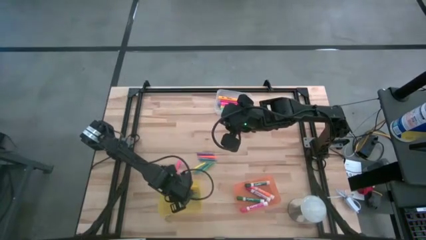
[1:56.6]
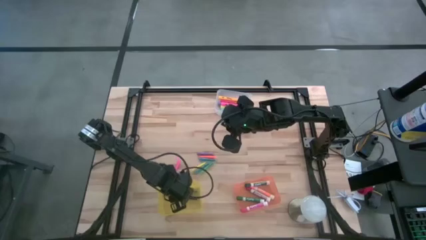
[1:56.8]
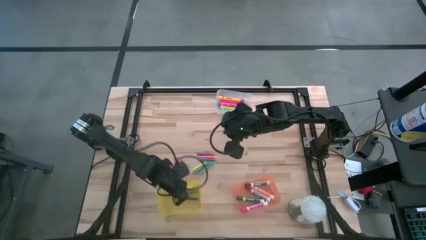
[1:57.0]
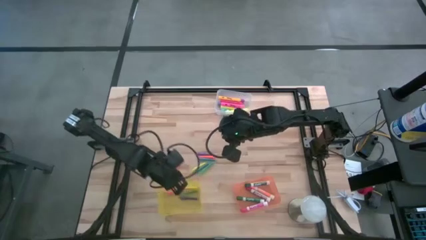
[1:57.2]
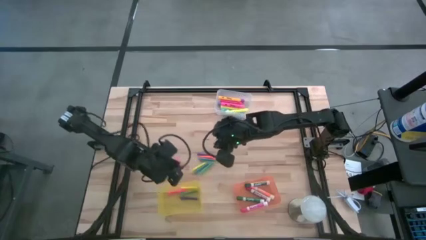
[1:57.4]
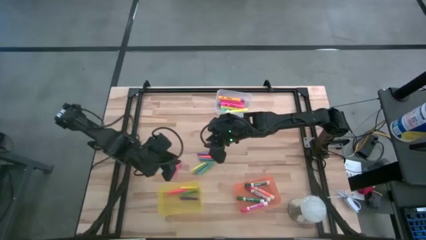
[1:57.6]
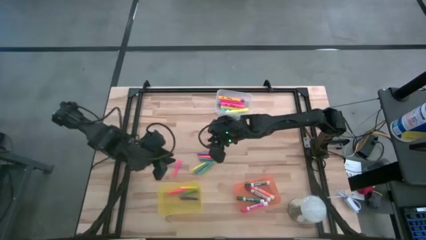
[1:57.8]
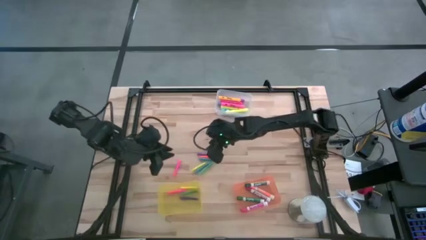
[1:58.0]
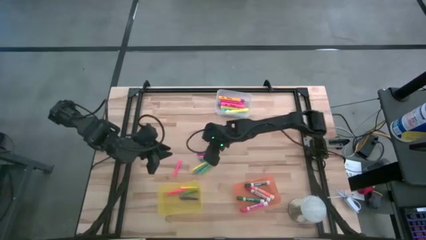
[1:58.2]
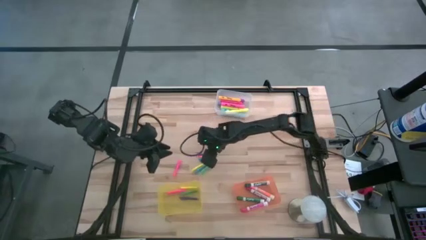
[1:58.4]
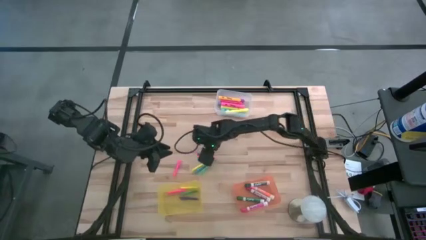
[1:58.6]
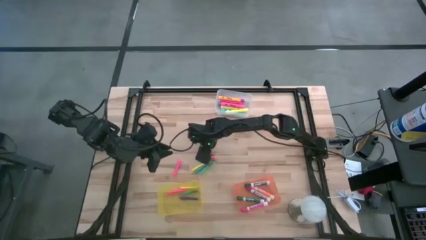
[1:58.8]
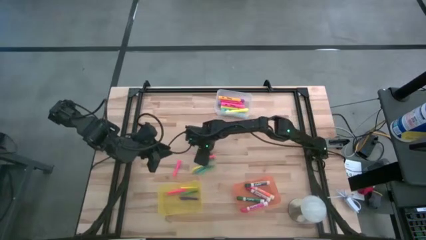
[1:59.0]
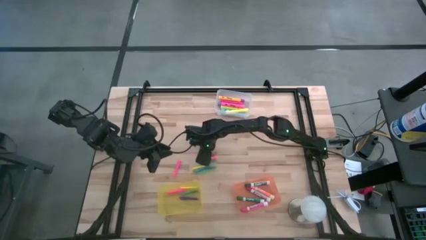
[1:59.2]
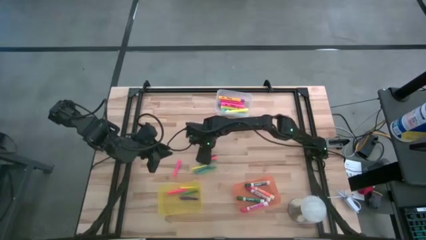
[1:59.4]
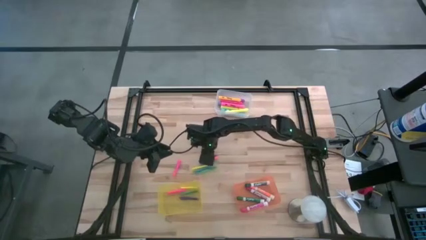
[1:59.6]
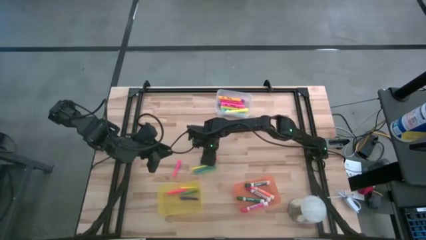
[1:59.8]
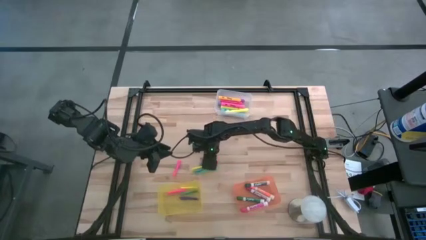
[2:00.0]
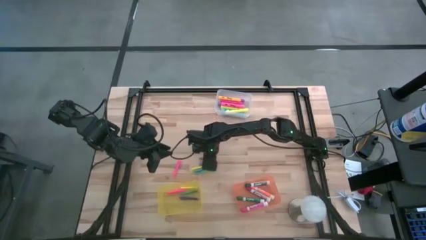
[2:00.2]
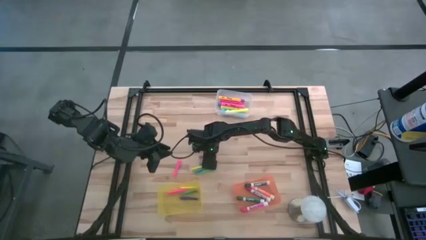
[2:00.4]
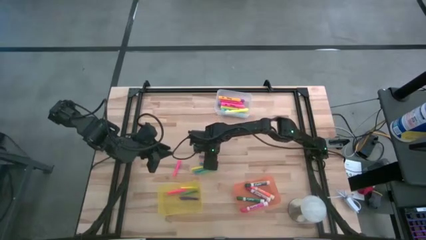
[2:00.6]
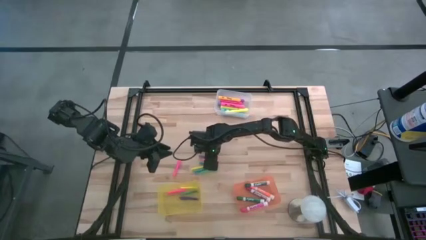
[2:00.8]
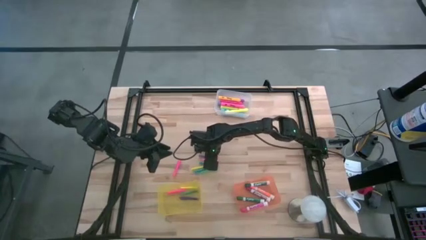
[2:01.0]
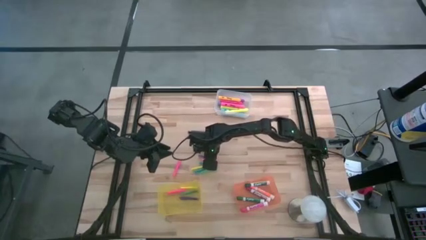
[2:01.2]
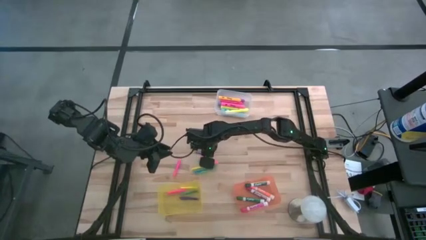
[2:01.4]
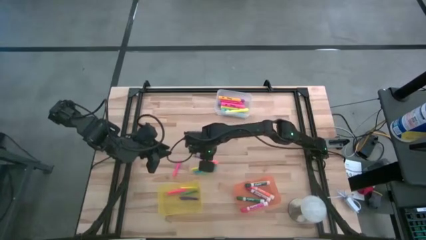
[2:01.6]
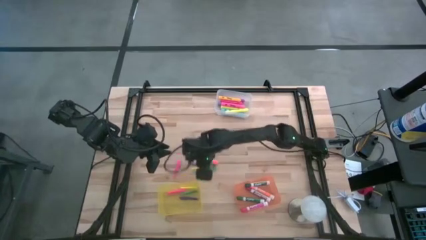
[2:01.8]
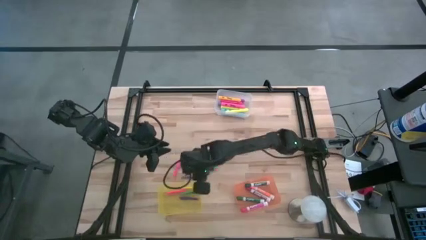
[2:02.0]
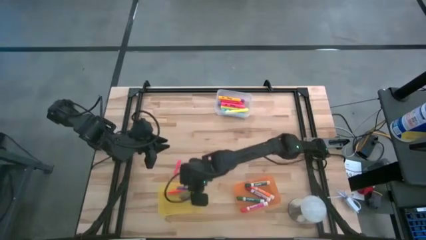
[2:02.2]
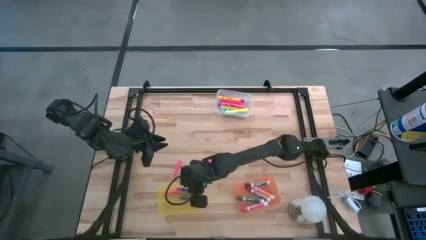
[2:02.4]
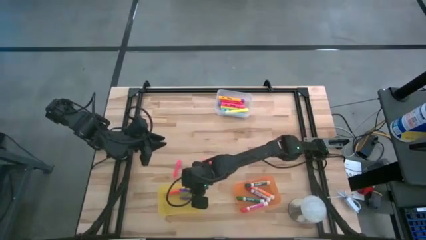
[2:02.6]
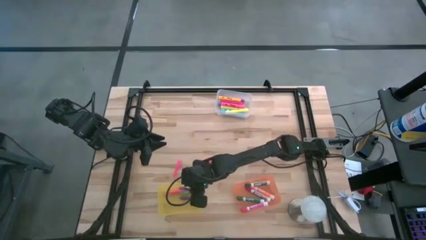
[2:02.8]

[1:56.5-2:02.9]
Task: Pick & Place Markers
Put the purple pen into the yellow bin

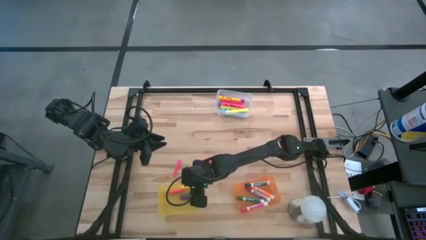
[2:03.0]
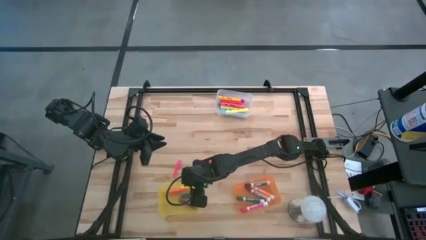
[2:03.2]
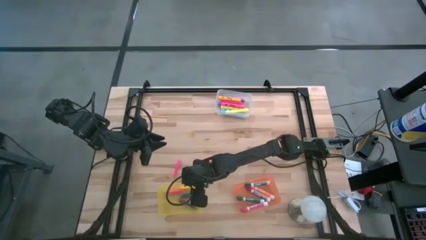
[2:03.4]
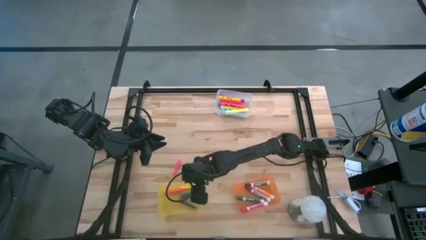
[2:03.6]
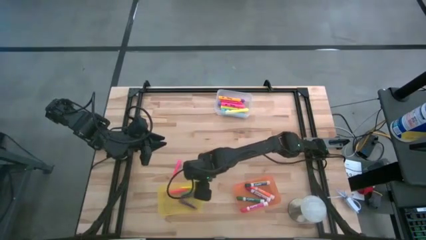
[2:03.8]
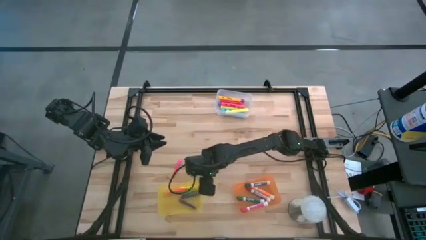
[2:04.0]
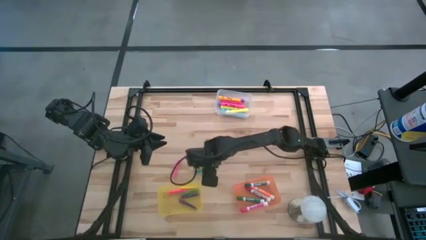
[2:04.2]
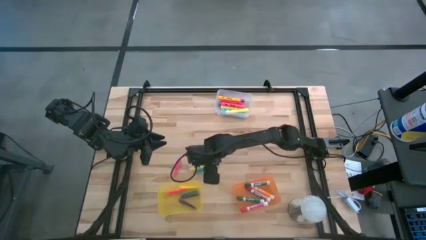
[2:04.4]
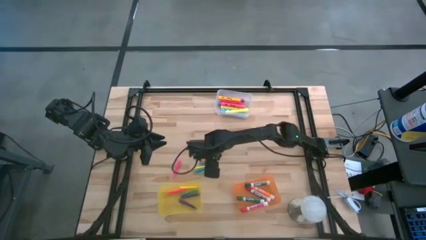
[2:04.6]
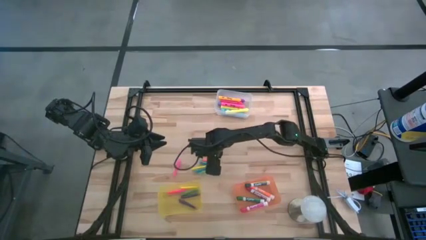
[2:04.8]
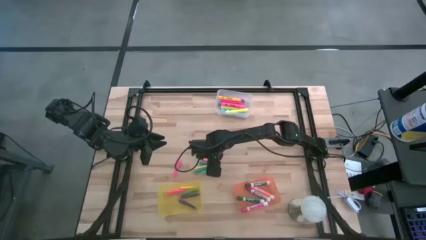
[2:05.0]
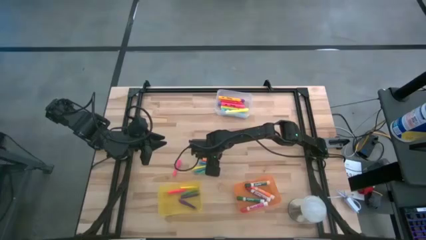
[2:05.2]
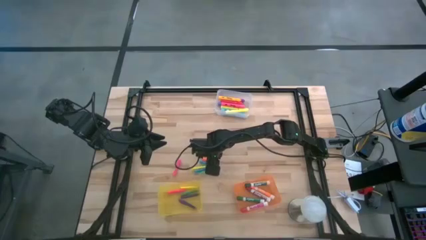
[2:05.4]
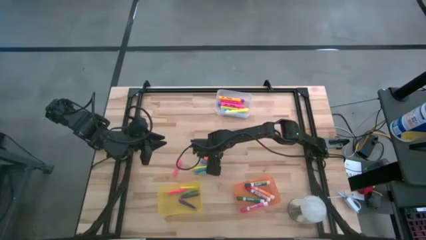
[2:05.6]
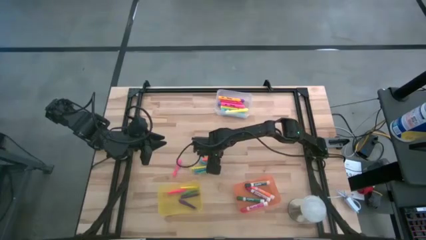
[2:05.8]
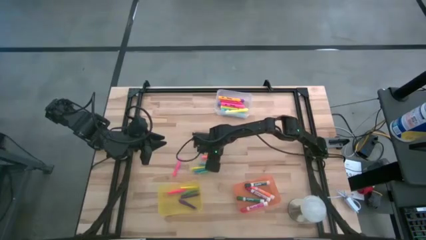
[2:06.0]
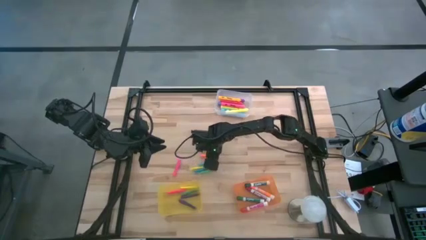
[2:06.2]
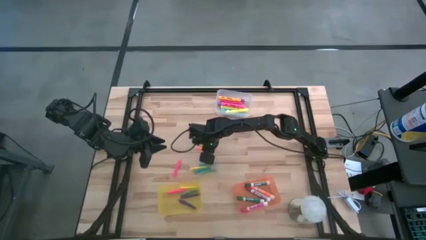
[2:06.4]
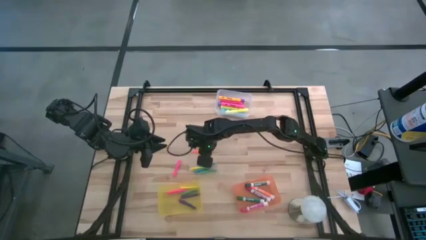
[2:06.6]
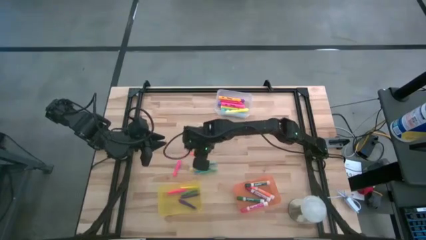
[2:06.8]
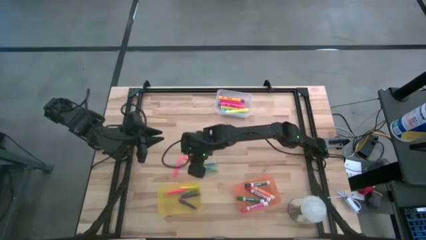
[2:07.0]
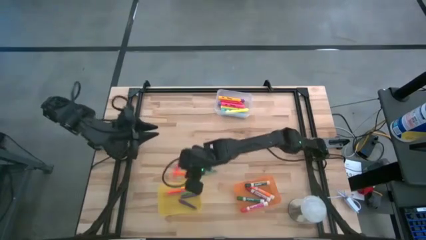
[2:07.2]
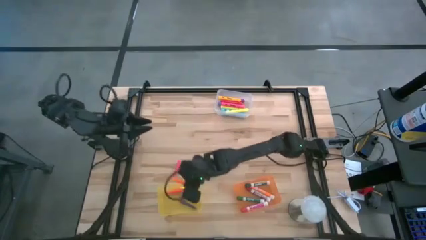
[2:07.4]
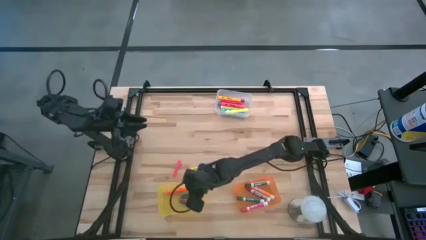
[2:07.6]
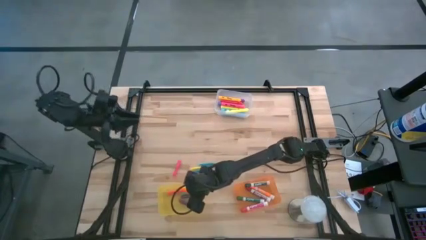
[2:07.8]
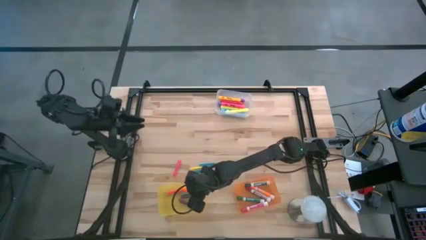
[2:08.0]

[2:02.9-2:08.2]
Put the orange pen into the yellow bin

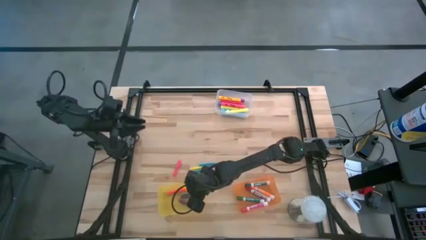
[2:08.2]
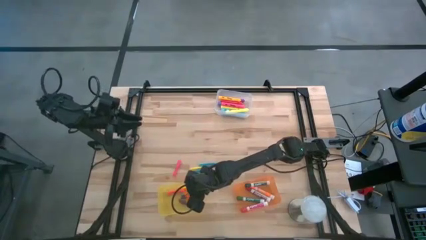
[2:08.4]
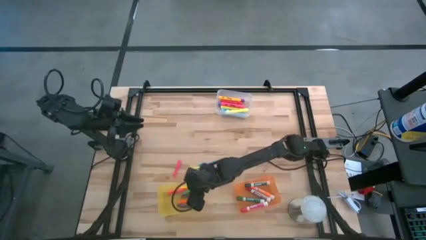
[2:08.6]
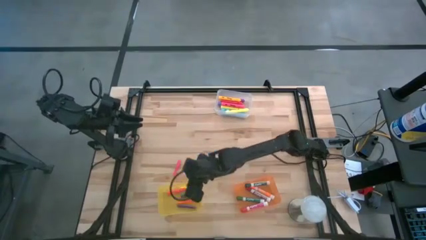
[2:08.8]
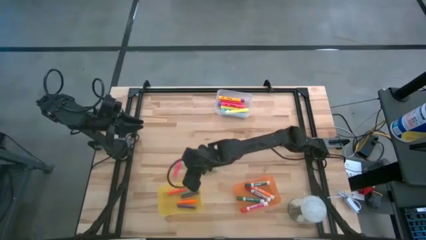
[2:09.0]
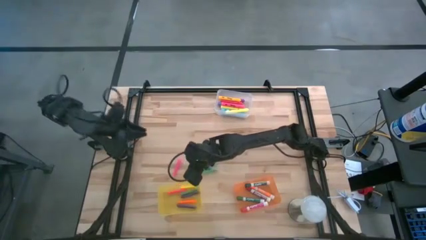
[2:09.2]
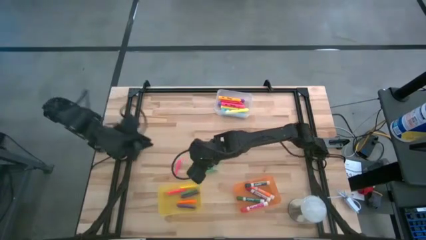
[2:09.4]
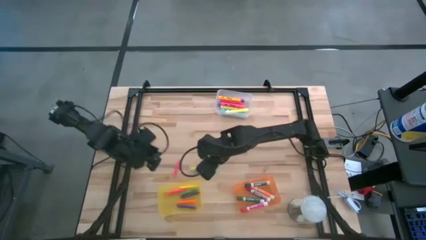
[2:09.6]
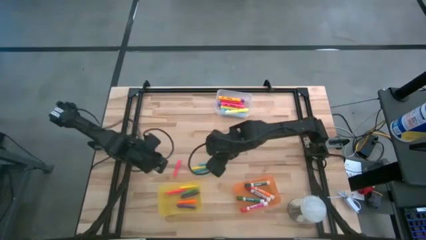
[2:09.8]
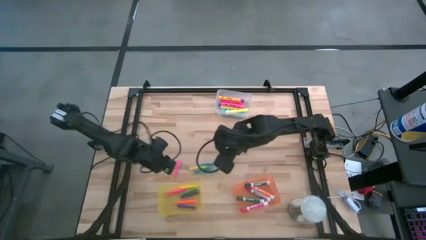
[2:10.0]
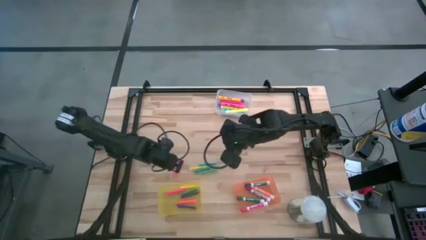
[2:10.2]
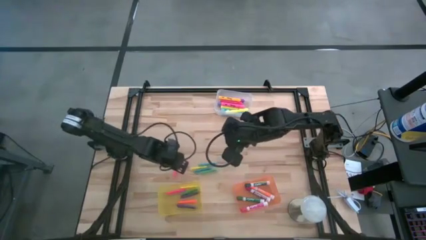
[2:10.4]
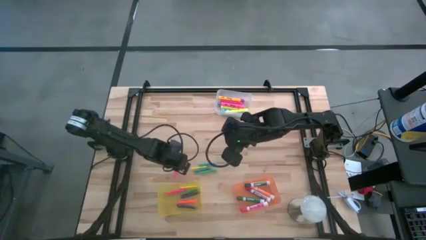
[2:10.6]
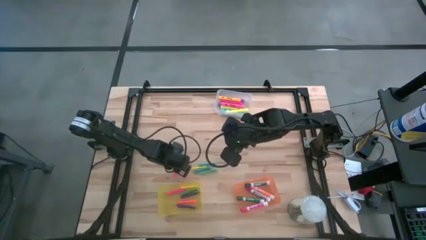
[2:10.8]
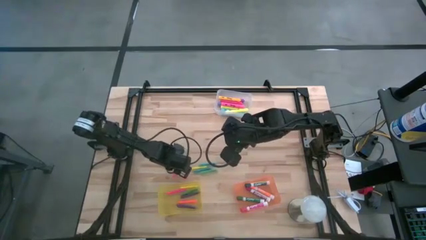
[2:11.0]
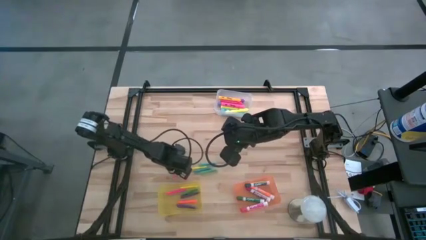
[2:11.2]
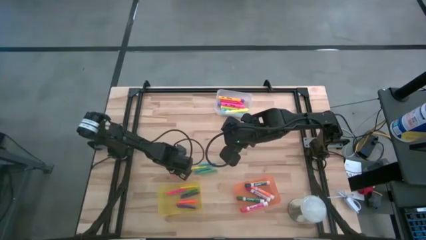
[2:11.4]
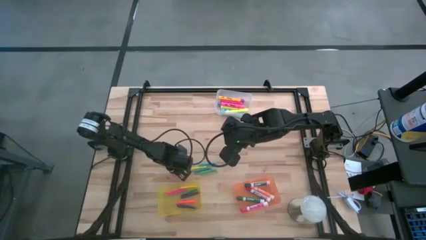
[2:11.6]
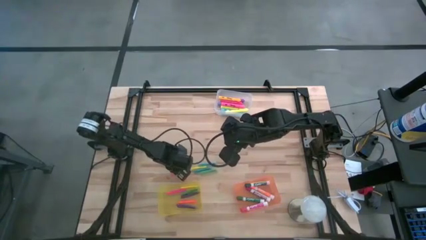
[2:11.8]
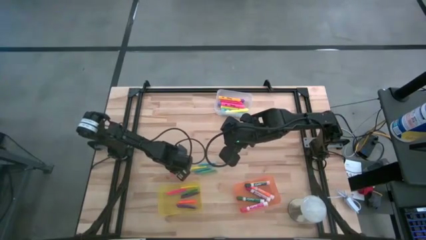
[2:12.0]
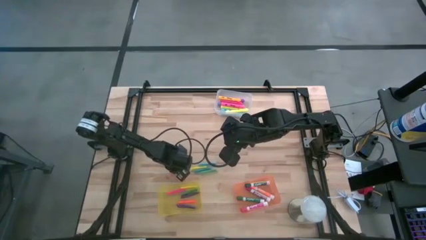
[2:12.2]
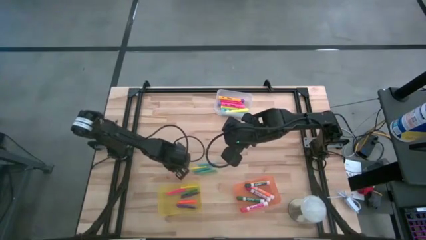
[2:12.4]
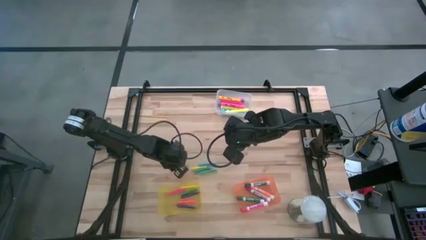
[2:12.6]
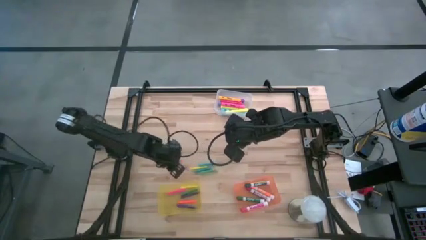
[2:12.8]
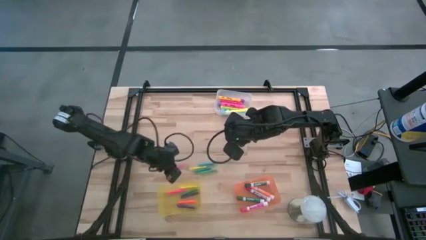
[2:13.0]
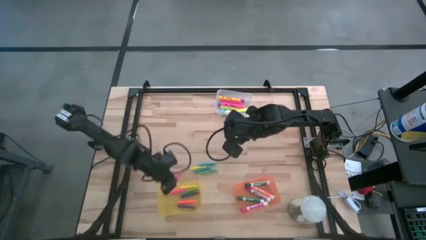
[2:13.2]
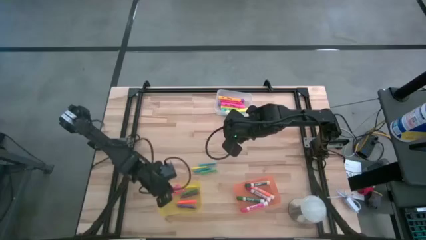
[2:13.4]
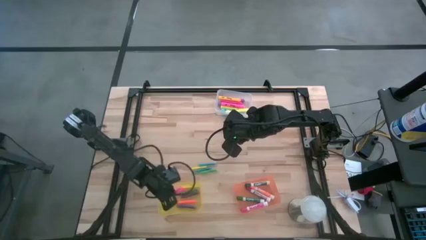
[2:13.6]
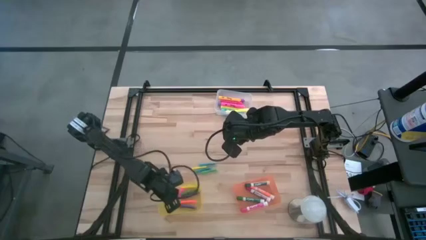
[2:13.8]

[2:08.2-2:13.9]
Put the pink pen into the yellow bin
